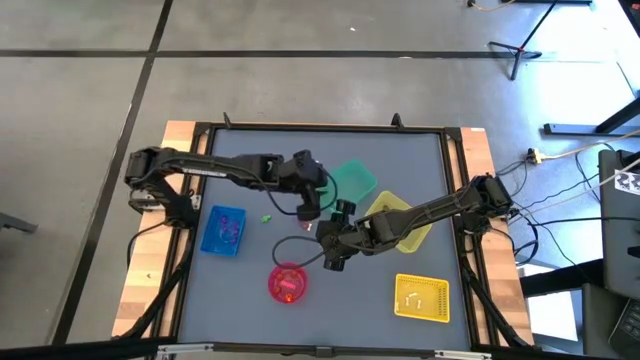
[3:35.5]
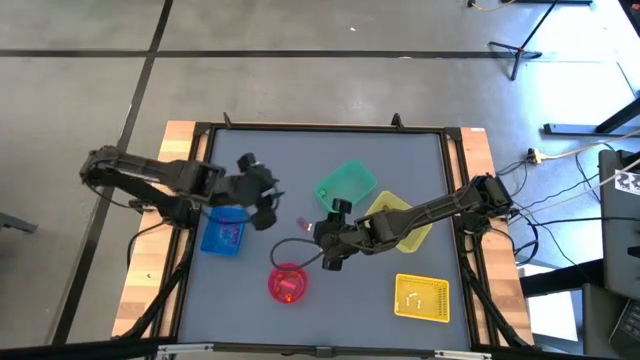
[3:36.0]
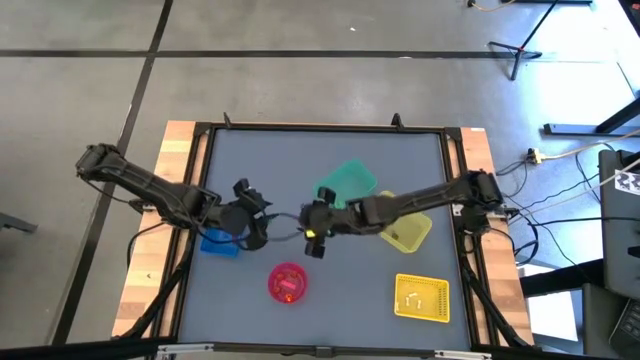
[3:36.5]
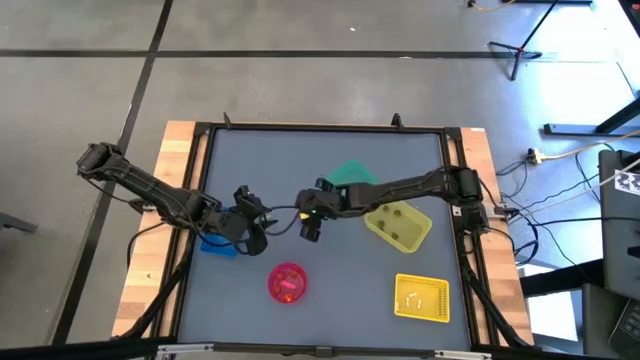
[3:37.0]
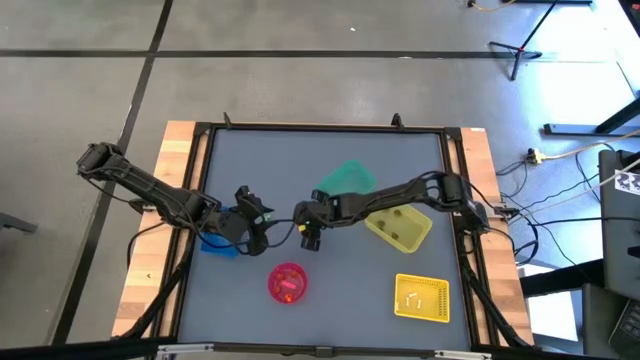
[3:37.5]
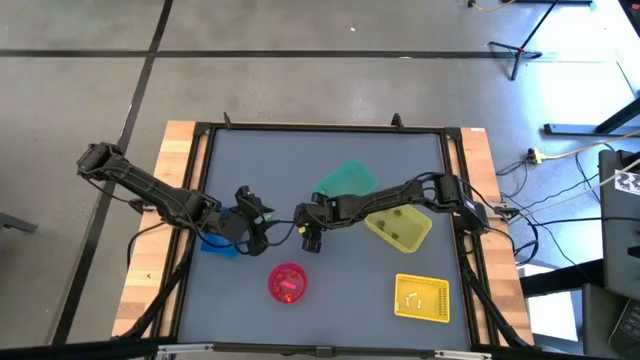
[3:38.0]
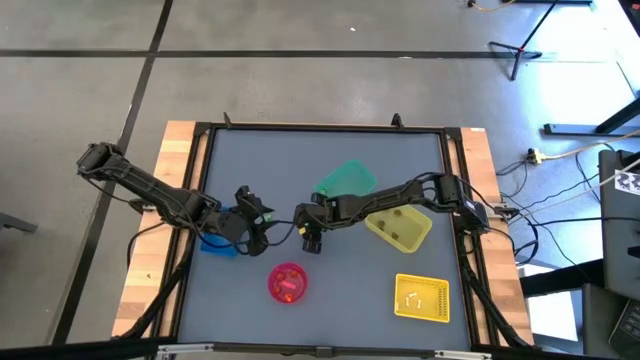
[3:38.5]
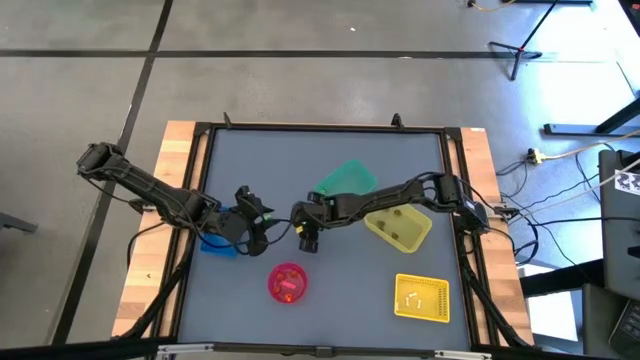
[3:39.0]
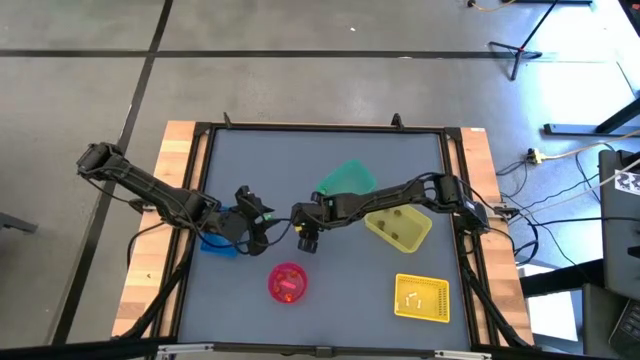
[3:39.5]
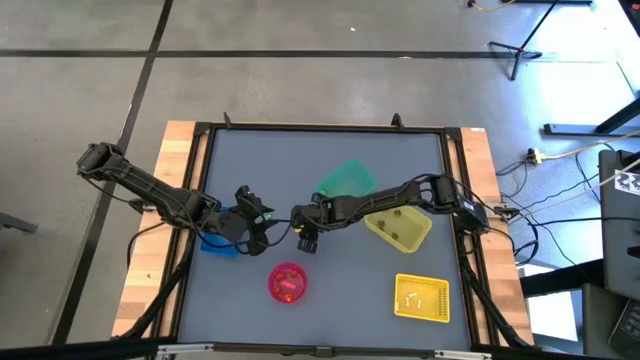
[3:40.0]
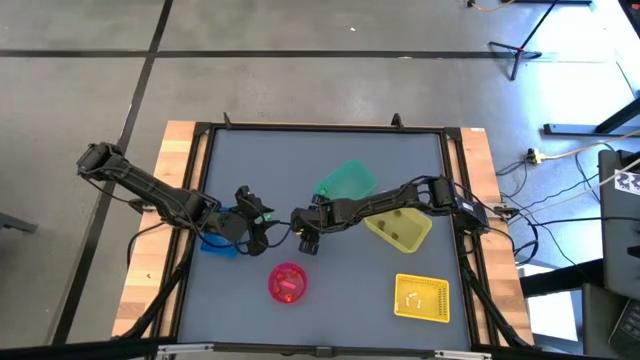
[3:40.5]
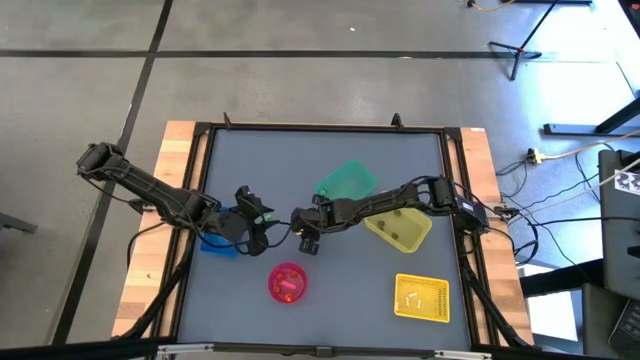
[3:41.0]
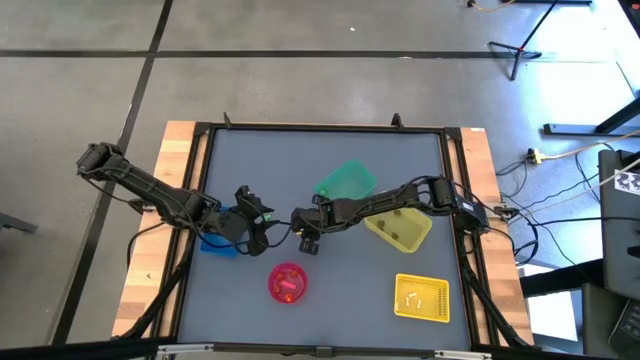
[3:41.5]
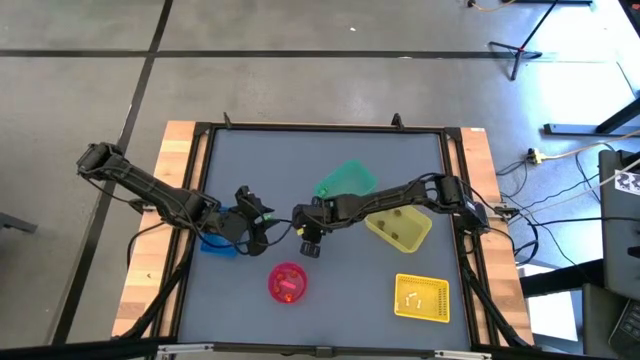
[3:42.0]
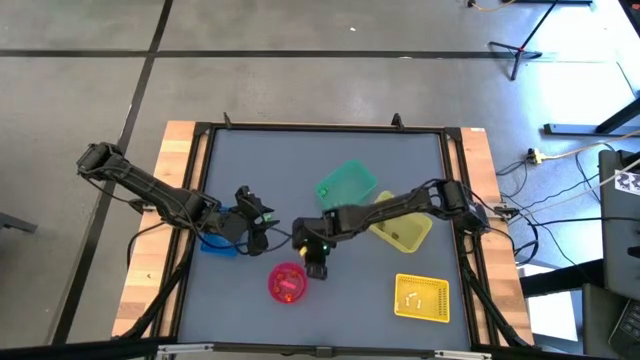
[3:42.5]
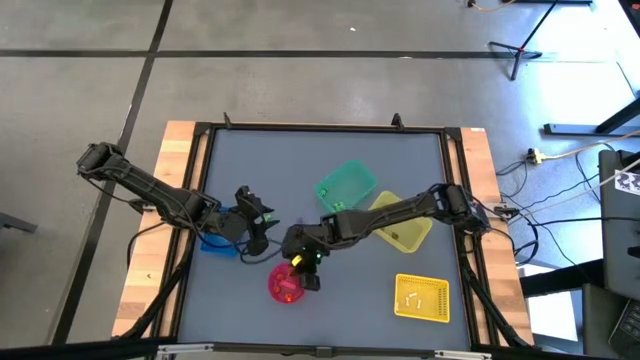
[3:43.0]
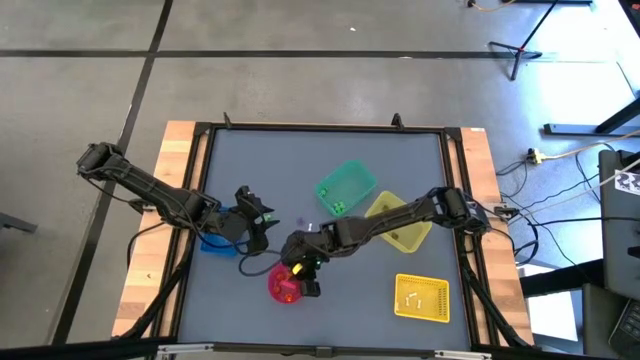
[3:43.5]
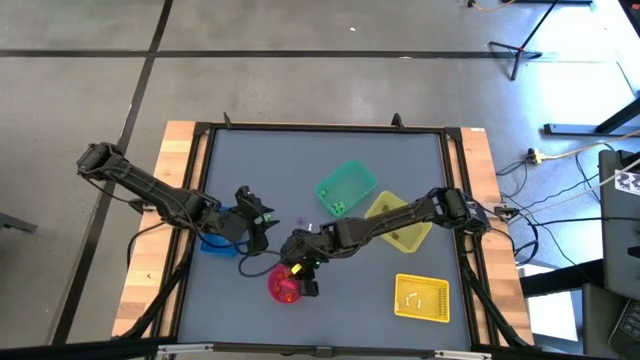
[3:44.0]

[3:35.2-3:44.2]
Task: Sort Halloween decoration
Put the orange pumpkin toy into the pink bowl

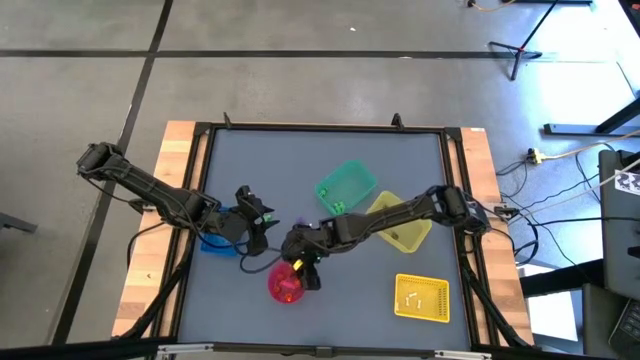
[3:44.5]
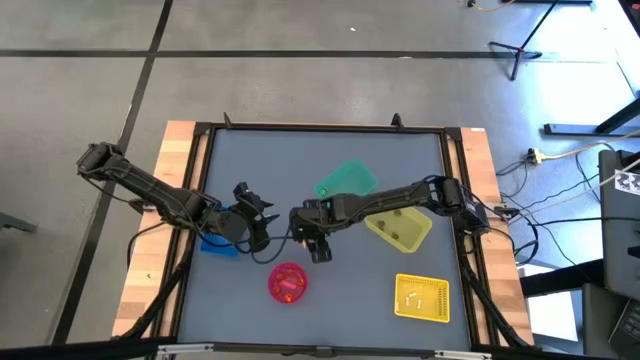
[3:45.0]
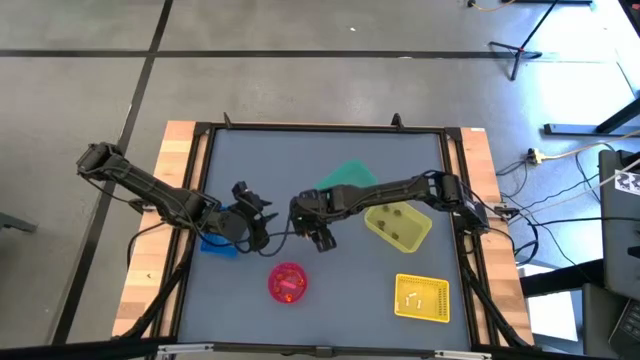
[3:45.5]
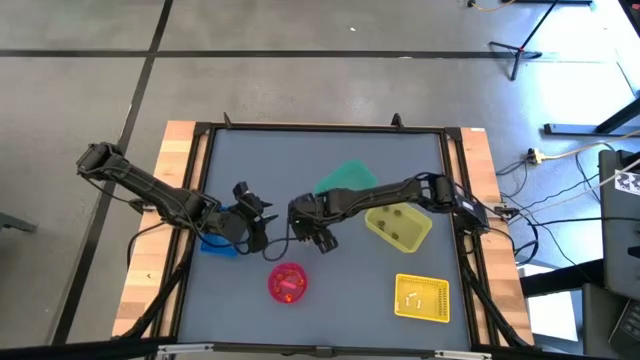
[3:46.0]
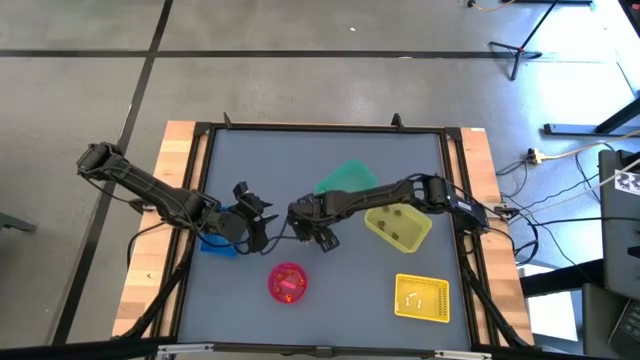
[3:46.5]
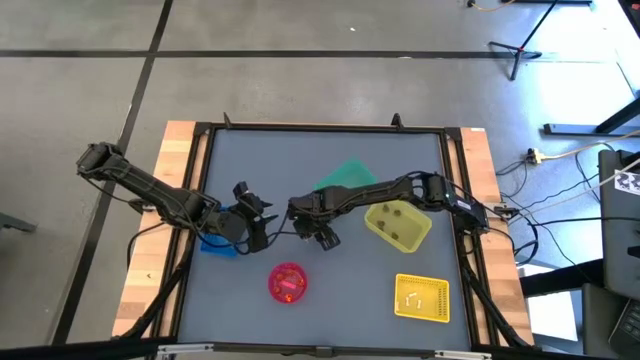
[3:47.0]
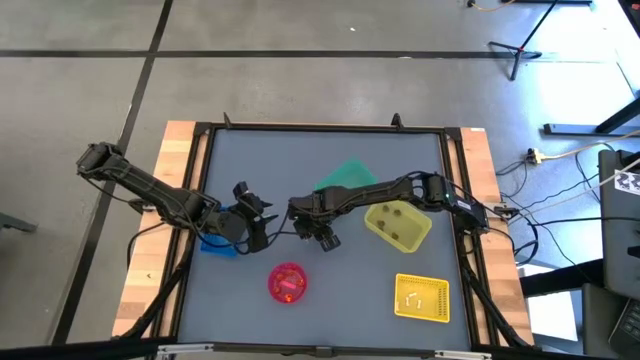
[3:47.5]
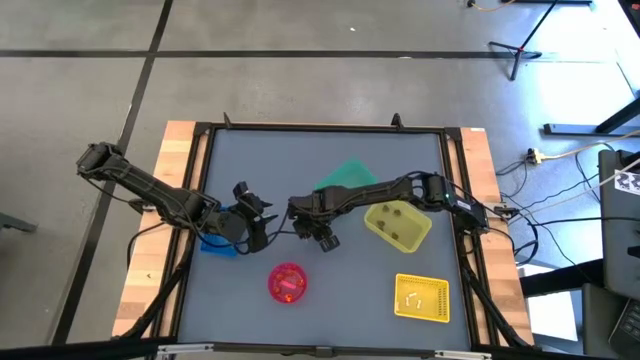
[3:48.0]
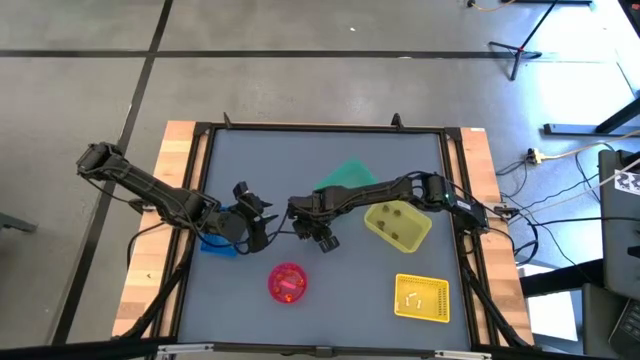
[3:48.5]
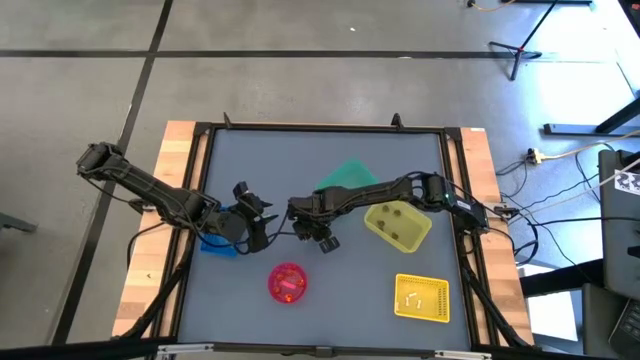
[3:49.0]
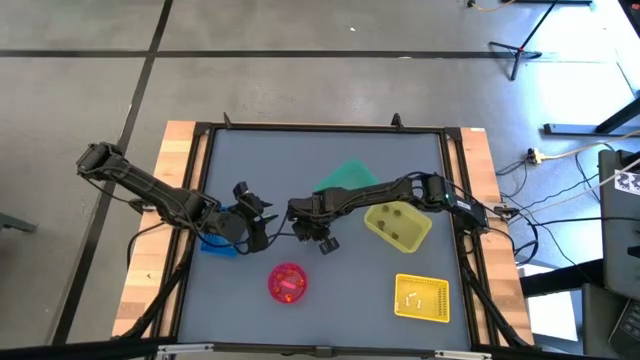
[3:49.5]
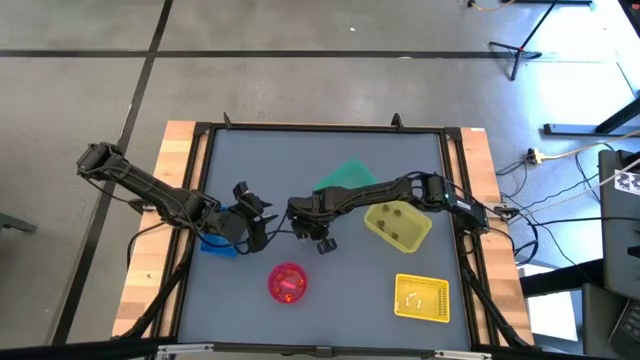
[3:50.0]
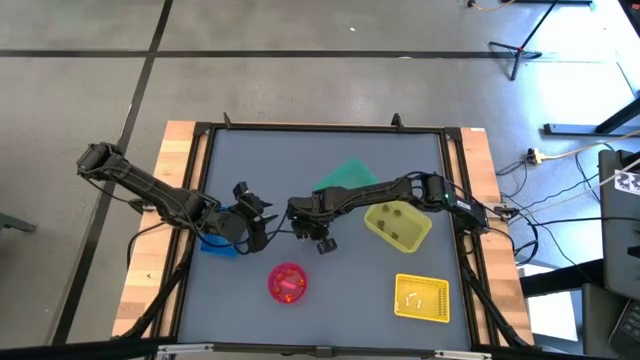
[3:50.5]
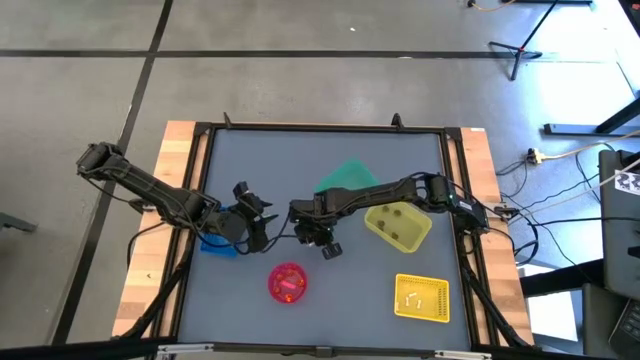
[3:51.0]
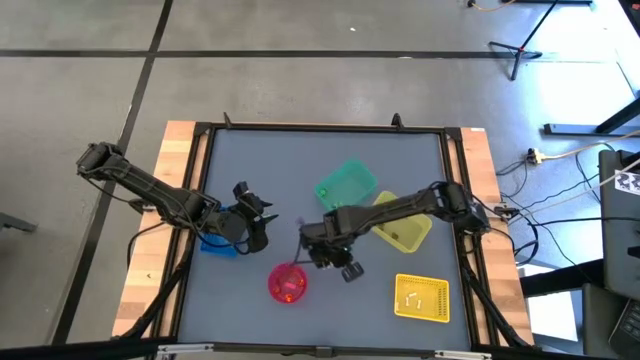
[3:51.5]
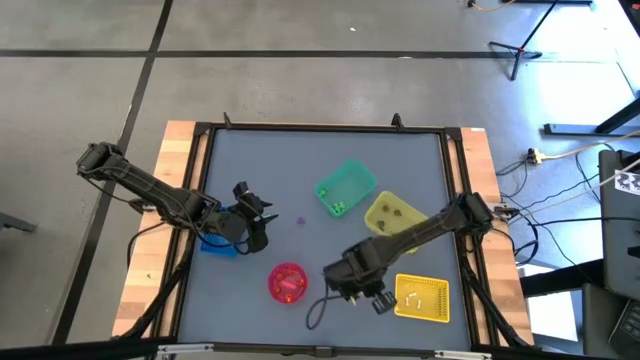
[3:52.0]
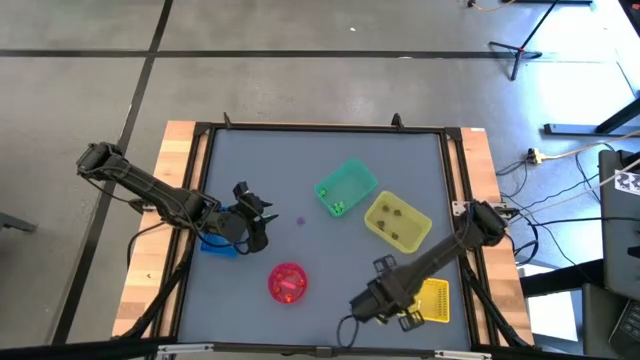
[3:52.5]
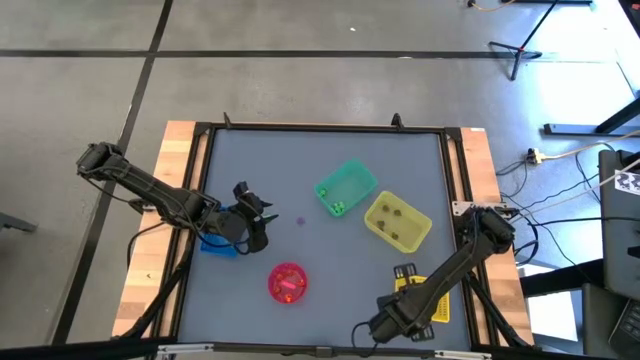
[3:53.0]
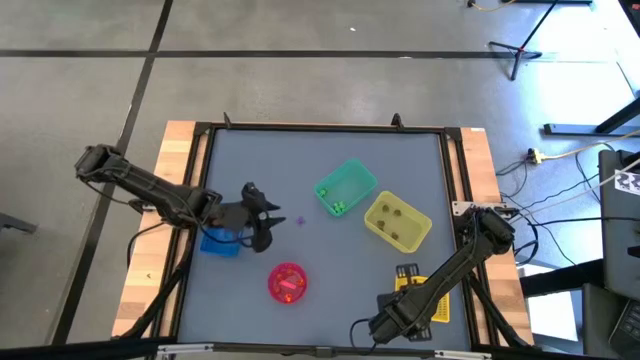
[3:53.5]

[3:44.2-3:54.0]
Put the white bone toy into the yellow bin

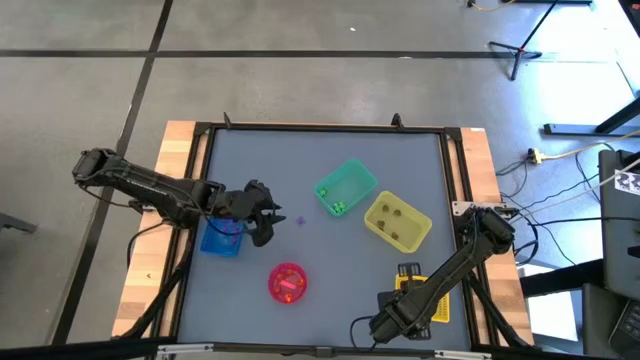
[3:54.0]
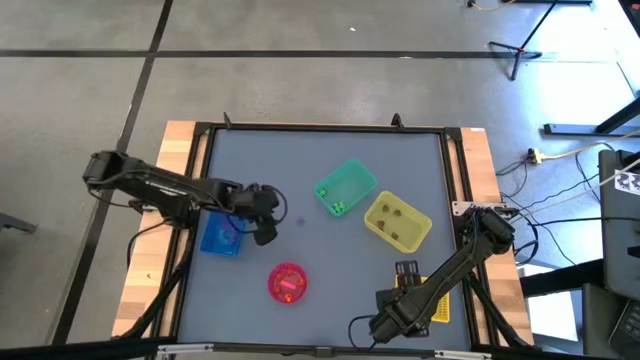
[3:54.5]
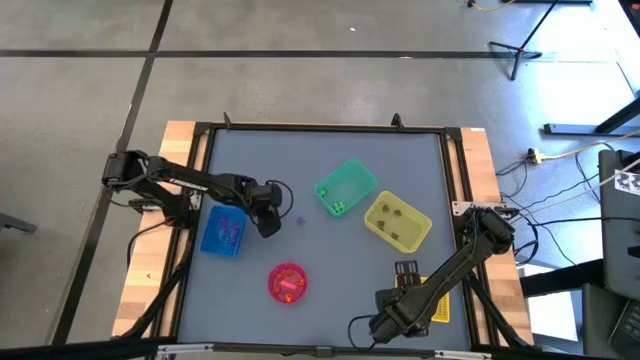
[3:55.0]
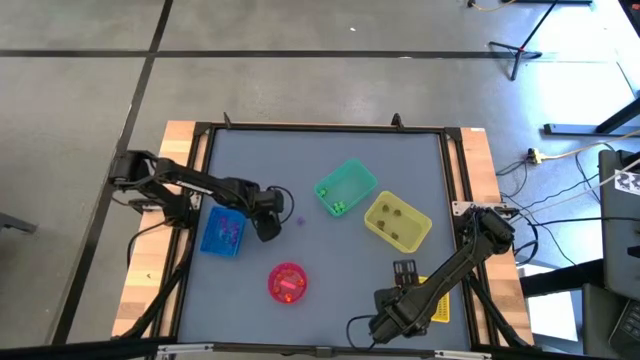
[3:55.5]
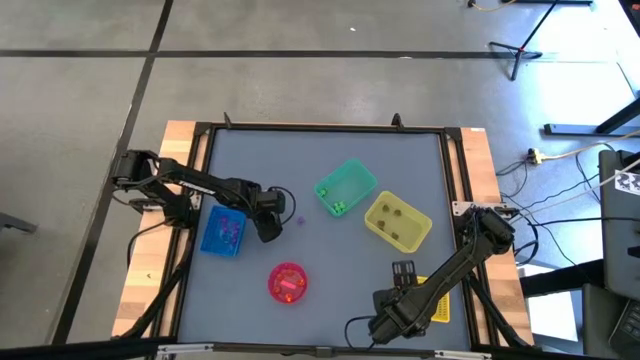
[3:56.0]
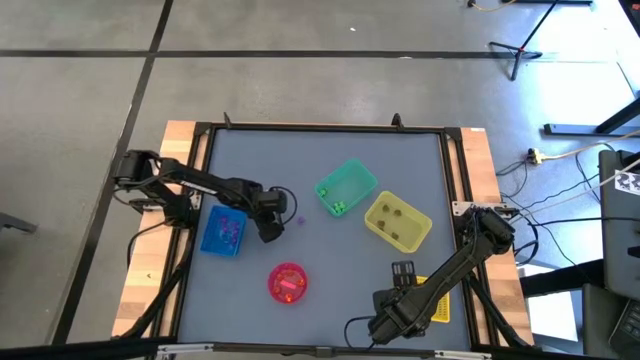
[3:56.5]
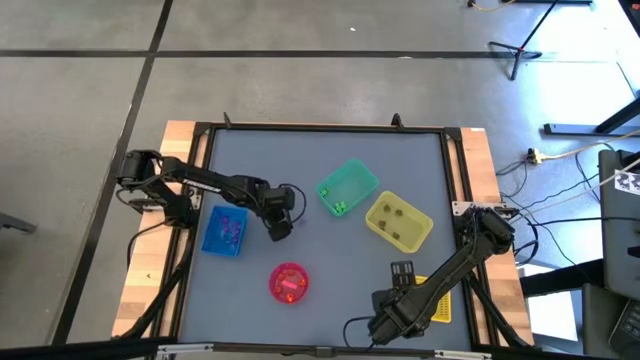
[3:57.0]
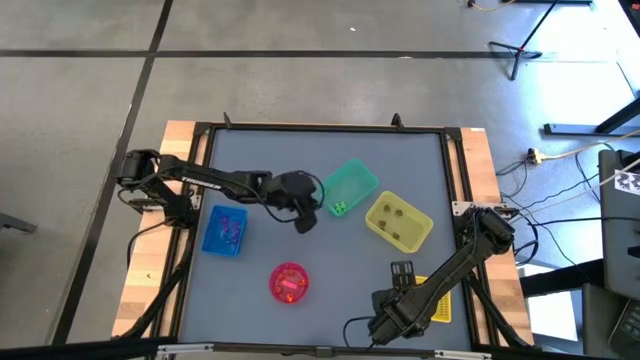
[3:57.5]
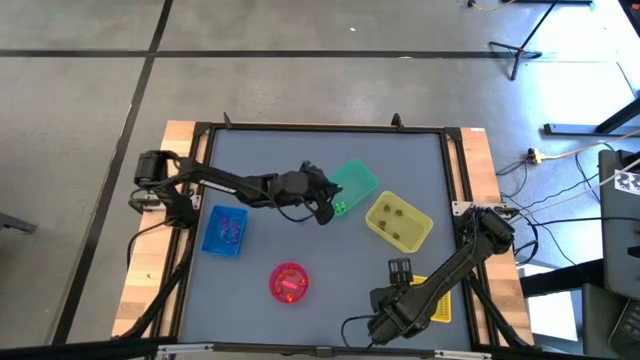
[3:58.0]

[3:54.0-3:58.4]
Put the green skeleton toy into the green bin
